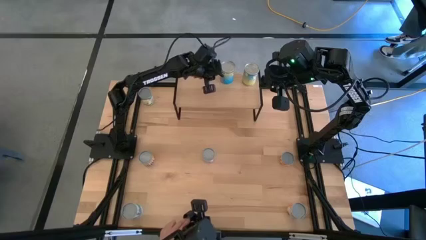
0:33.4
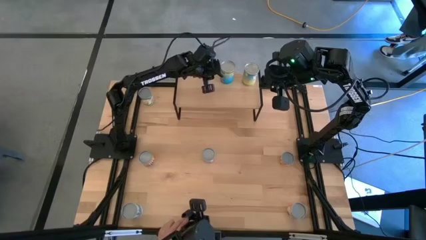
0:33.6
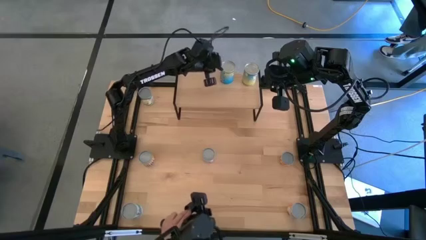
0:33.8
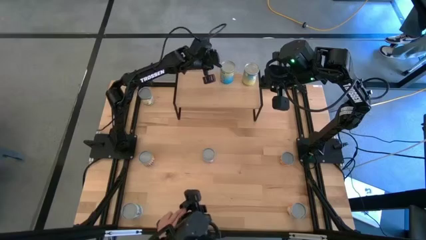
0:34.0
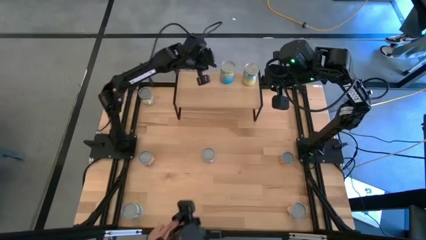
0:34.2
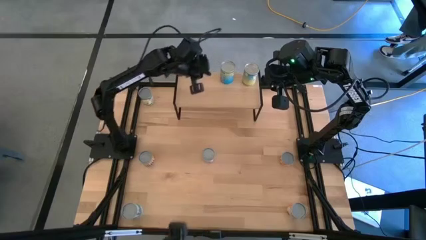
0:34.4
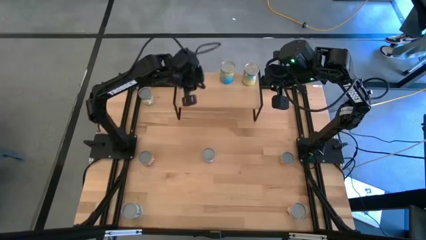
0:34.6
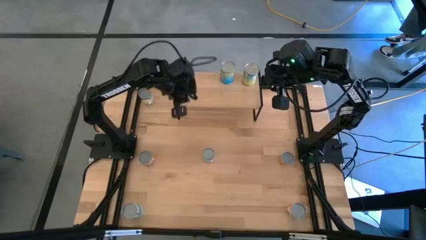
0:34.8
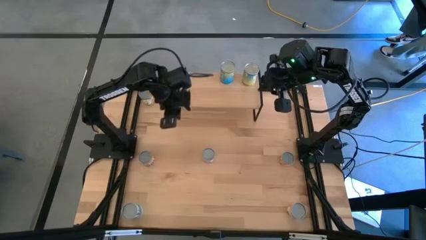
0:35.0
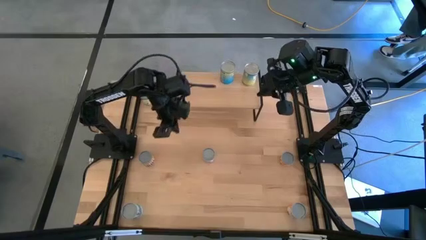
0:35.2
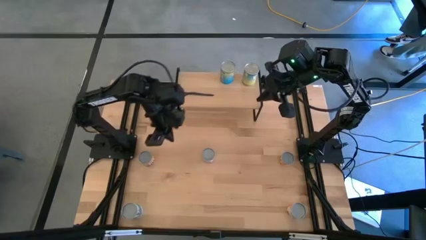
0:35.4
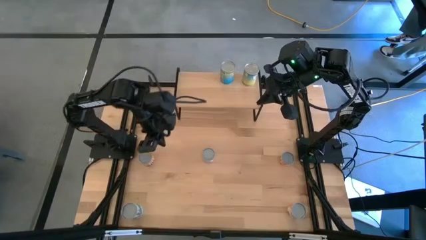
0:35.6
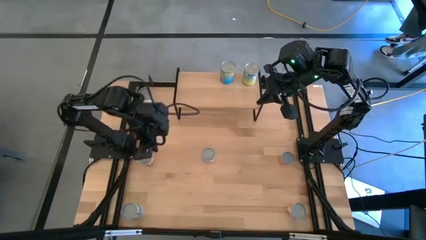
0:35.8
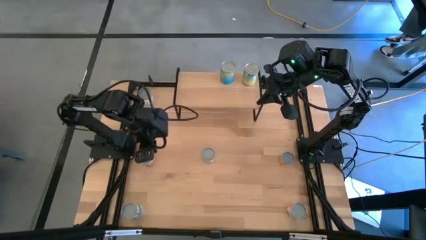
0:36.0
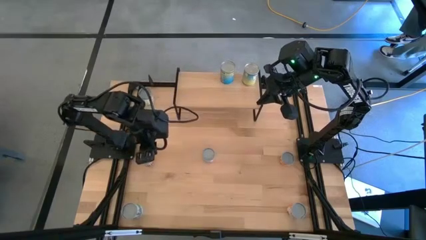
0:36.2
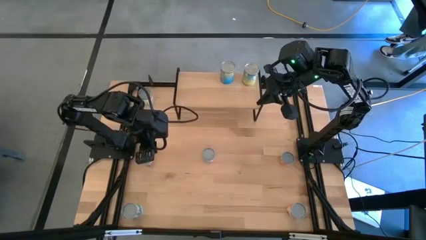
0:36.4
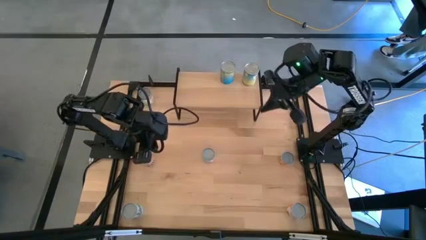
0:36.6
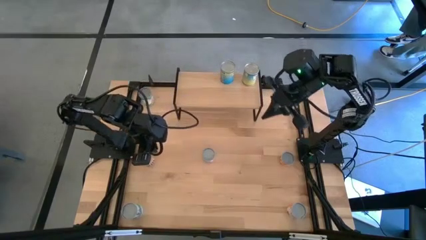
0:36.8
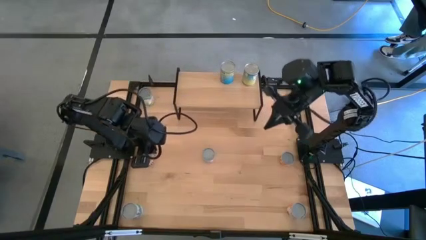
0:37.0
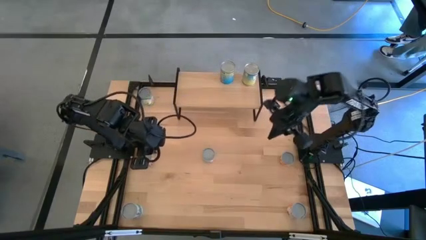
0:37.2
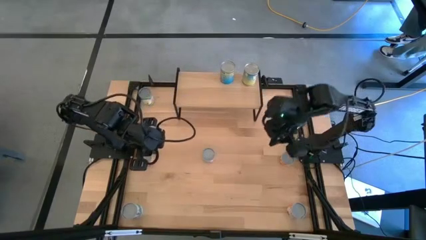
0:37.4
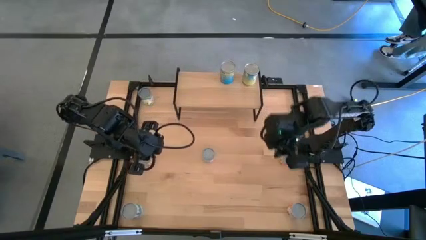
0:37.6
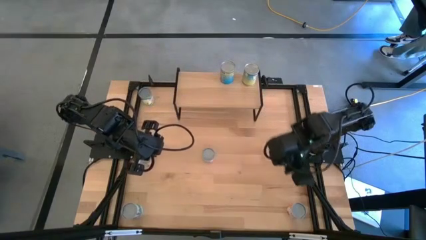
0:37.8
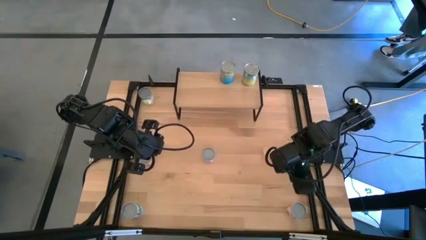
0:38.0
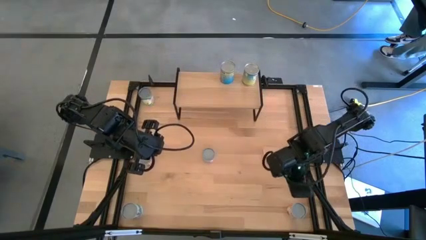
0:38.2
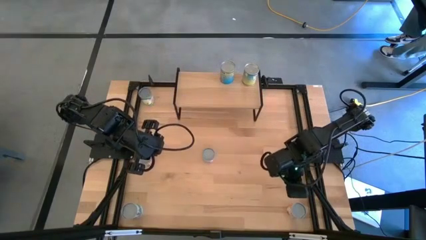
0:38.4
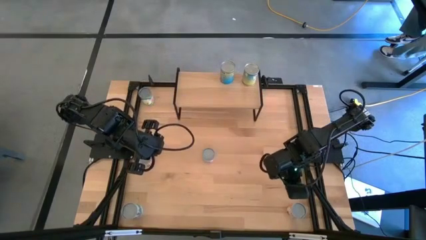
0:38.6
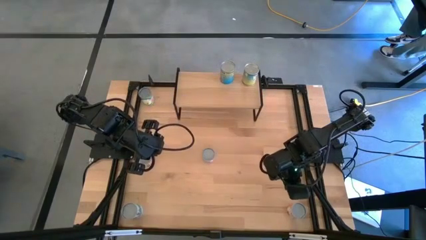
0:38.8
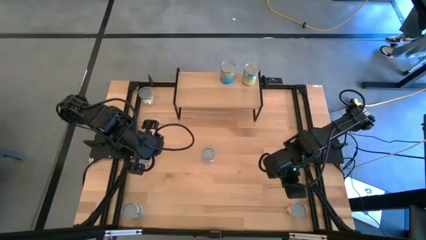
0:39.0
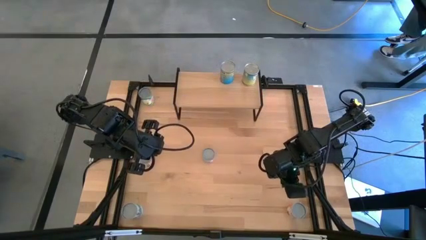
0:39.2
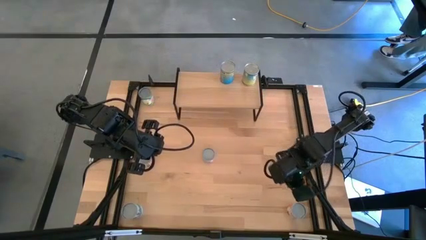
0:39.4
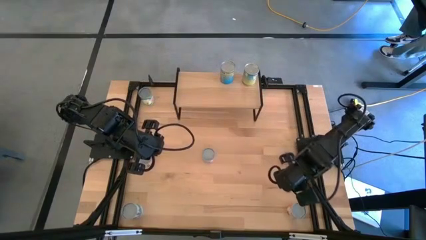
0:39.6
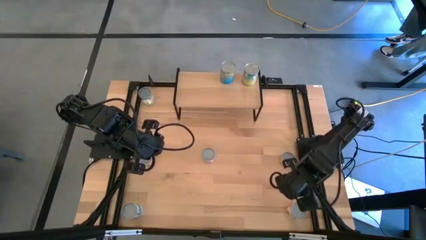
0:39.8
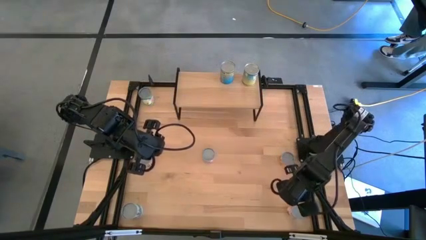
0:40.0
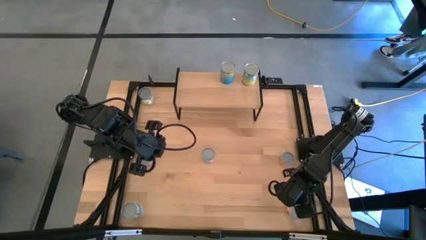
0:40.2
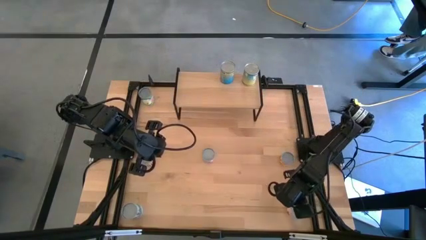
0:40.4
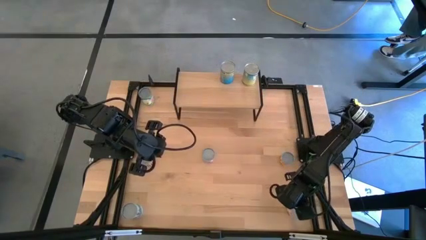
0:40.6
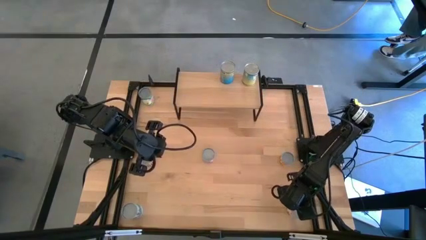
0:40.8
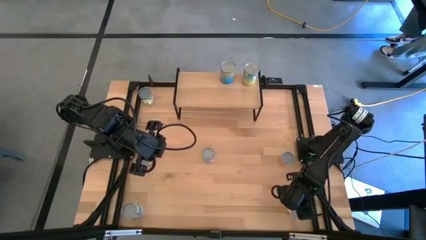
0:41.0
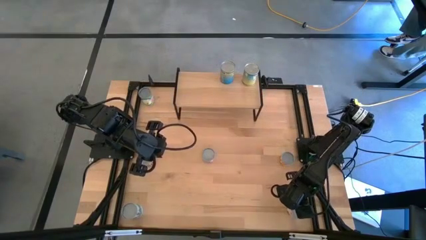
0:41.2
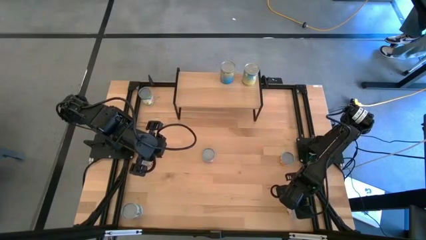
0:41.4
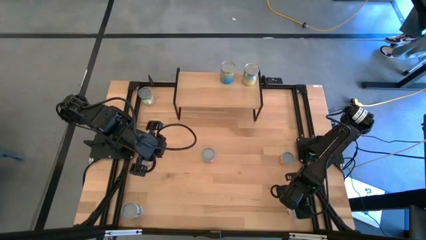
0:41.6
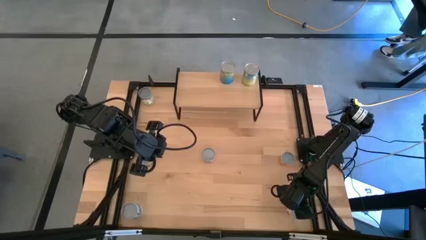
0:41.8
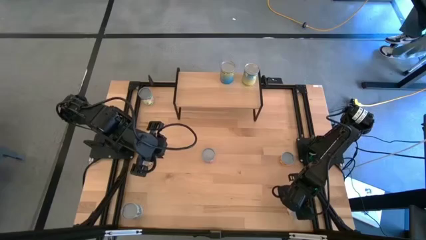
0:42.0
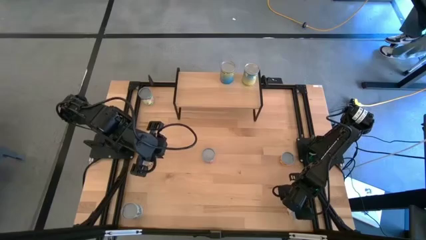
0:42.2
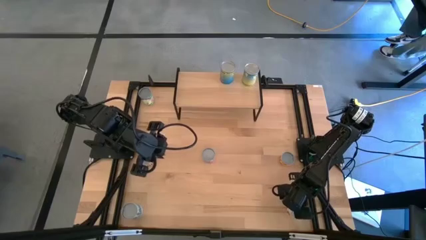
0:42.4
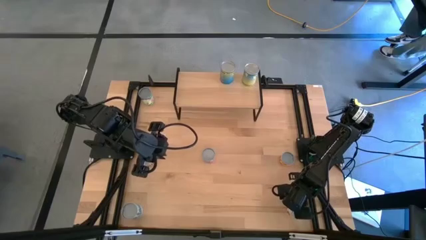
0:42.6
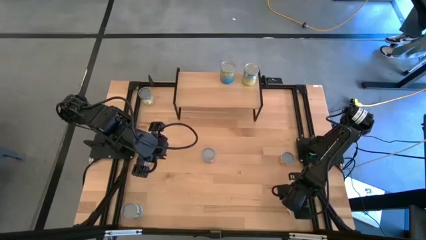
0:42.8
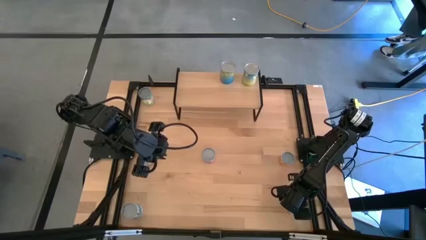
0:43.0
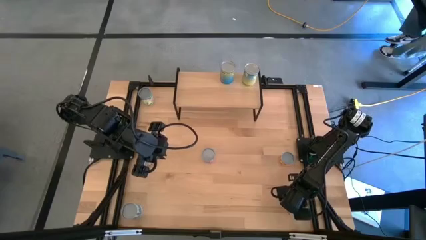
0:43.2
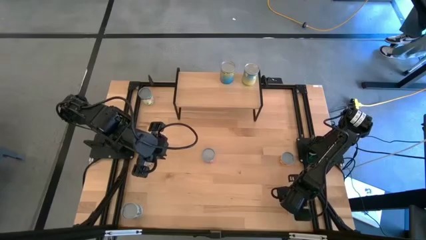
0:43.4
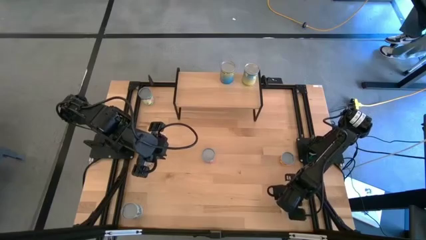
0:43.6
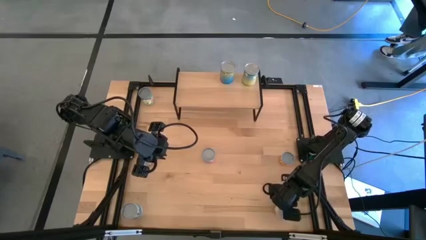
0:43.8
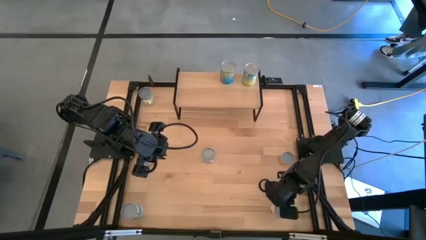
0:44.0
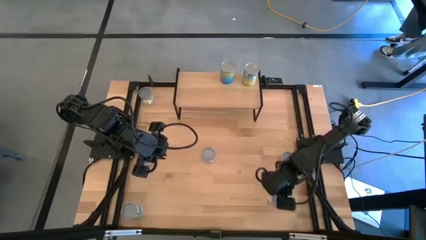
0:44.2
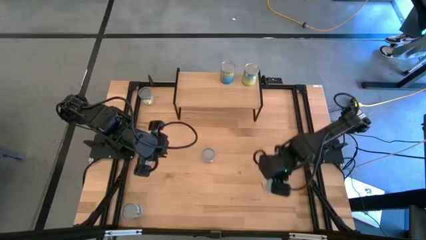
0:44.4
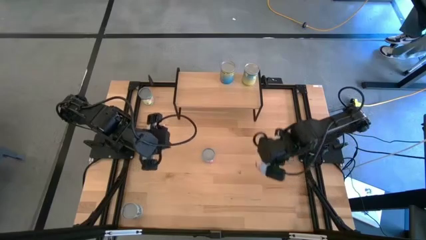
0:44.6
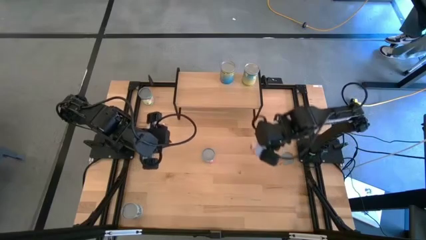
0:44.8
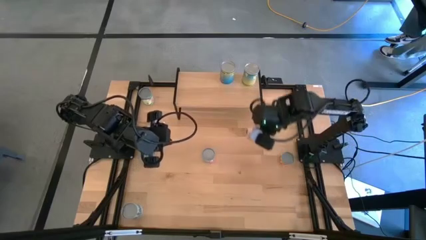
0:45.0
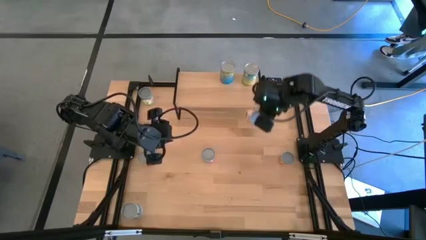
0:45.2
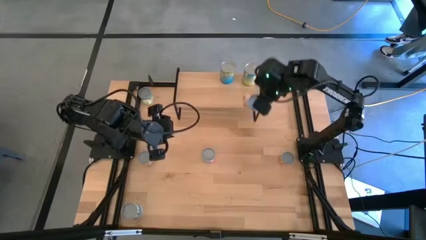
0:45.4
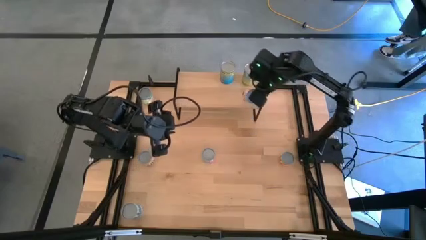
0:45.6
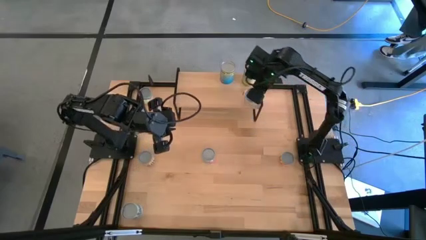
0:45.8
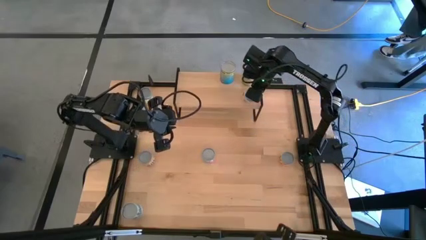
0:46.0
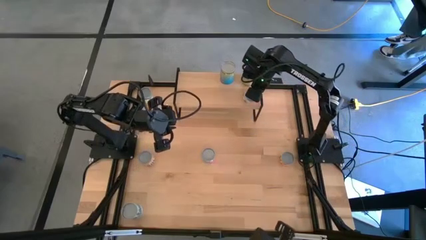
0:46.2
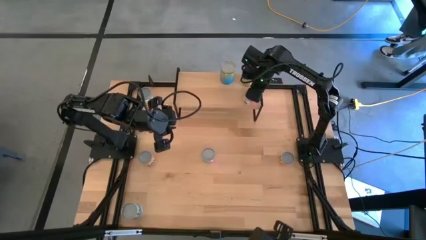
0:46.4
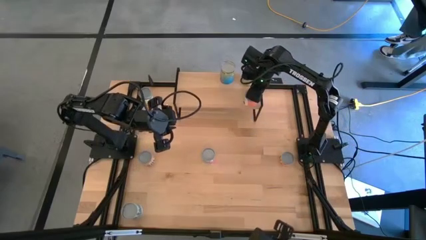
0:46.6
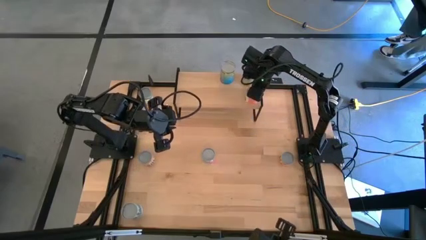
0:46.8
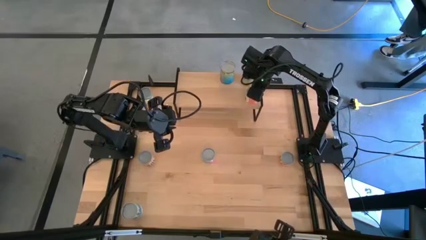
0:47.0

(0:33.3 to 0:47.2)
Task: Pick and place cans onto a shelf
Put the canned meatballs on the shelf
